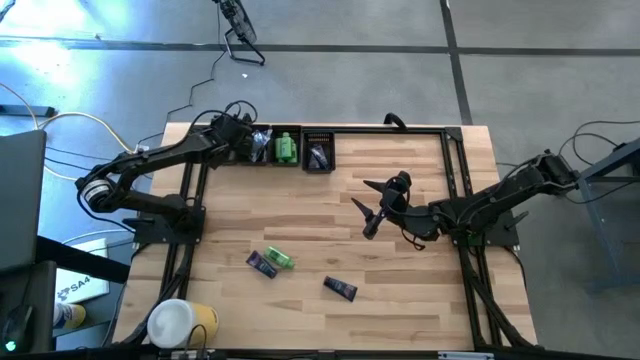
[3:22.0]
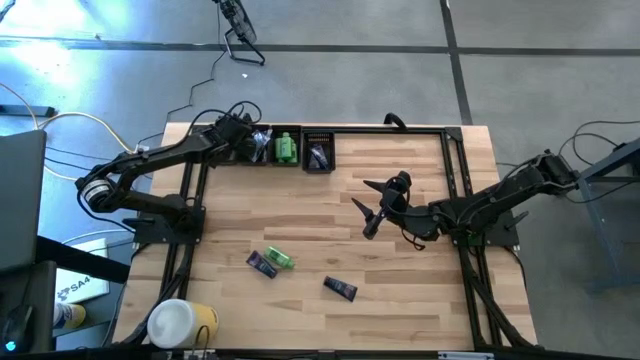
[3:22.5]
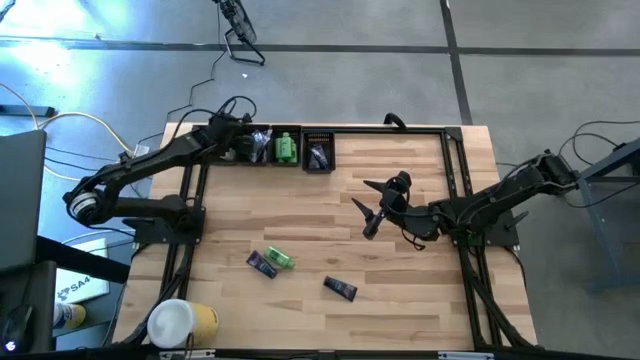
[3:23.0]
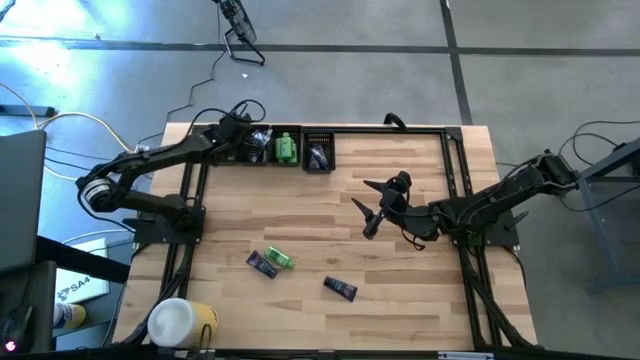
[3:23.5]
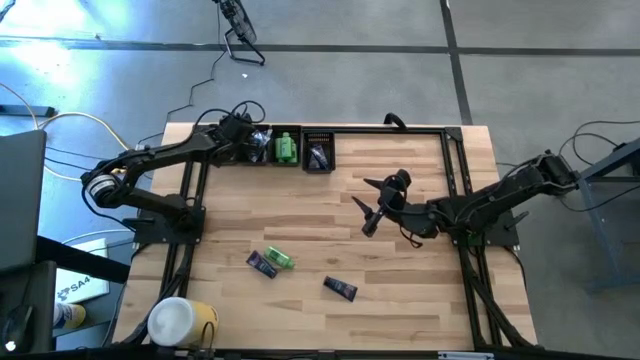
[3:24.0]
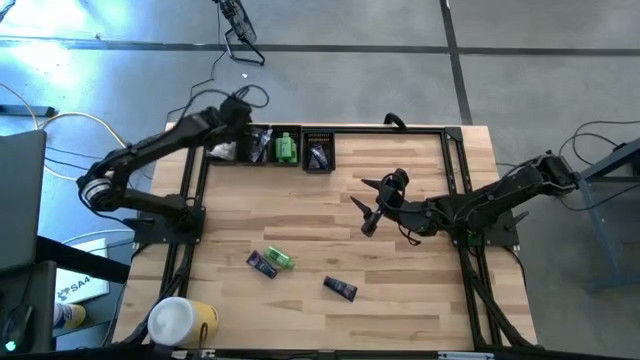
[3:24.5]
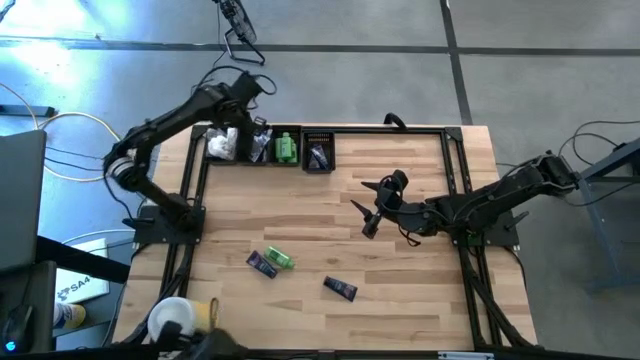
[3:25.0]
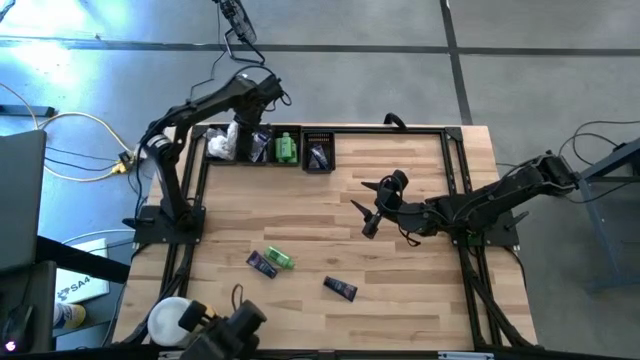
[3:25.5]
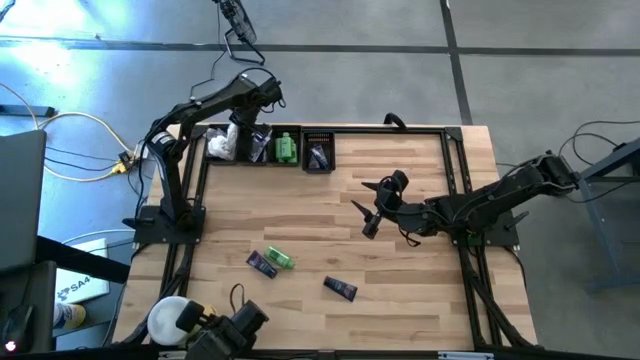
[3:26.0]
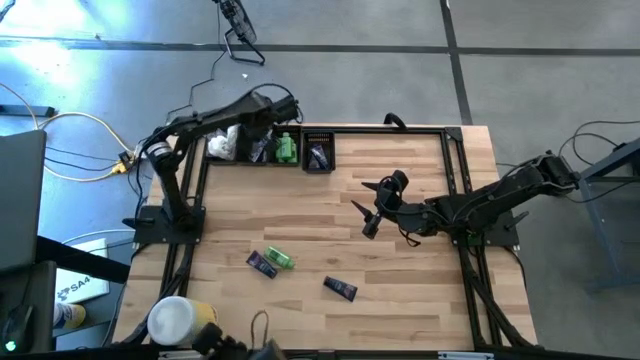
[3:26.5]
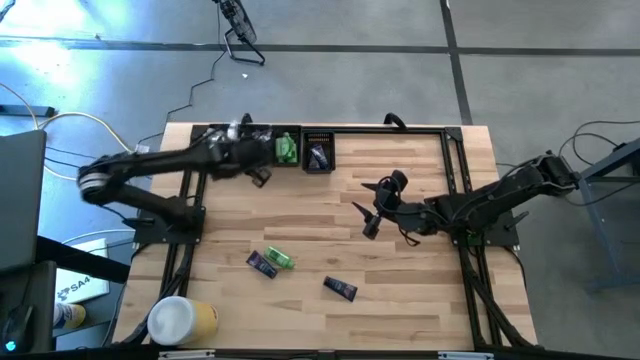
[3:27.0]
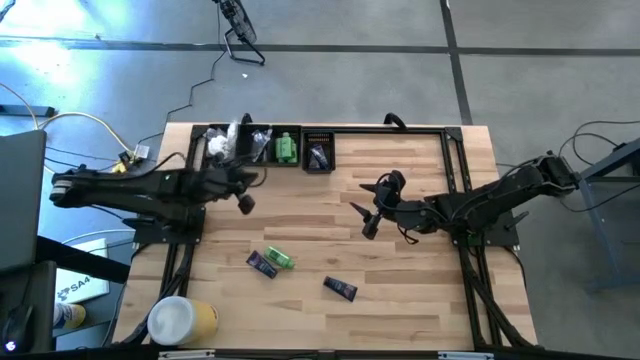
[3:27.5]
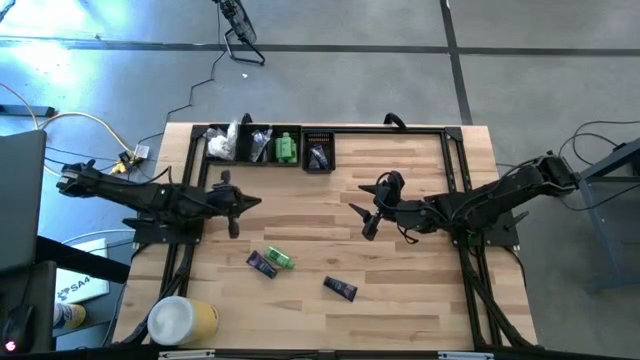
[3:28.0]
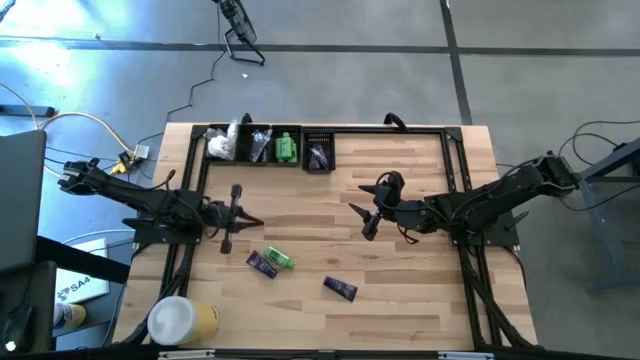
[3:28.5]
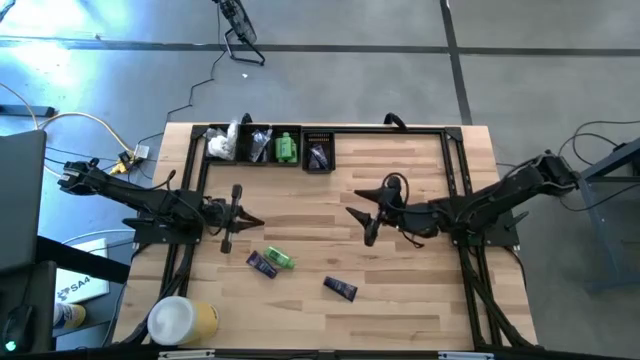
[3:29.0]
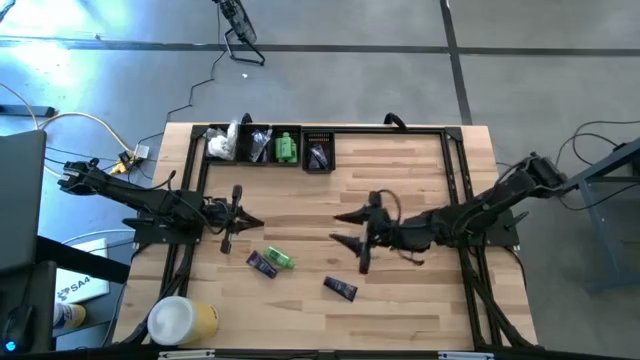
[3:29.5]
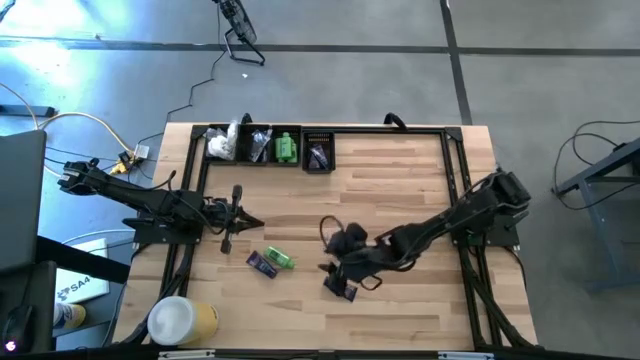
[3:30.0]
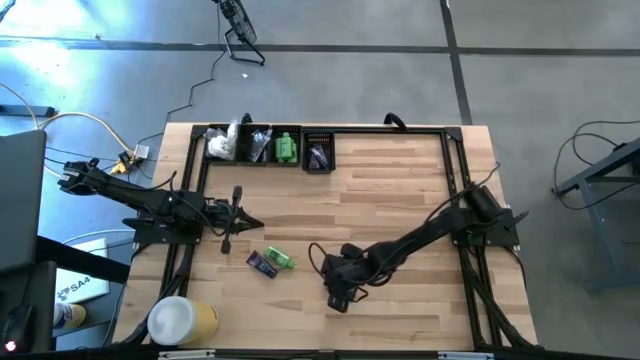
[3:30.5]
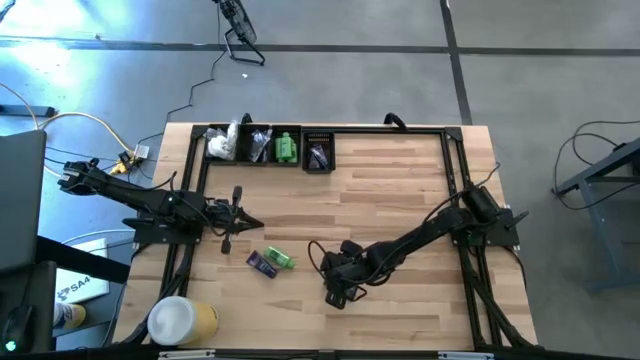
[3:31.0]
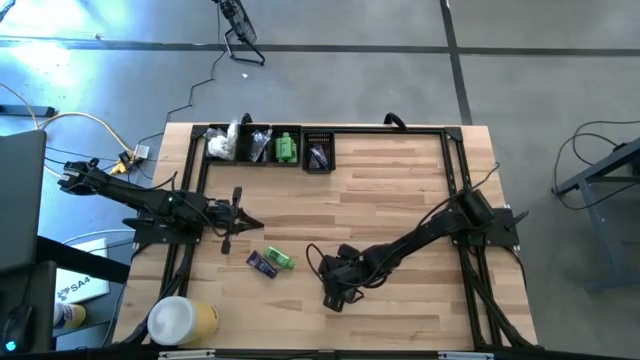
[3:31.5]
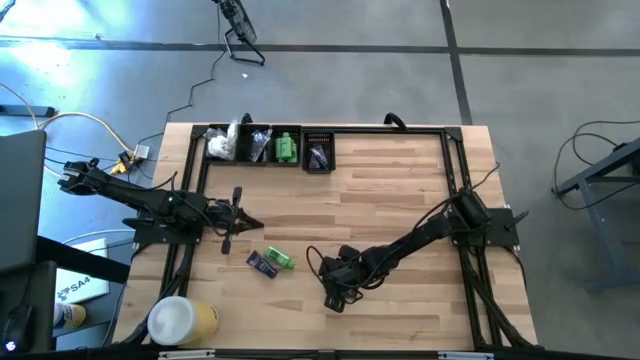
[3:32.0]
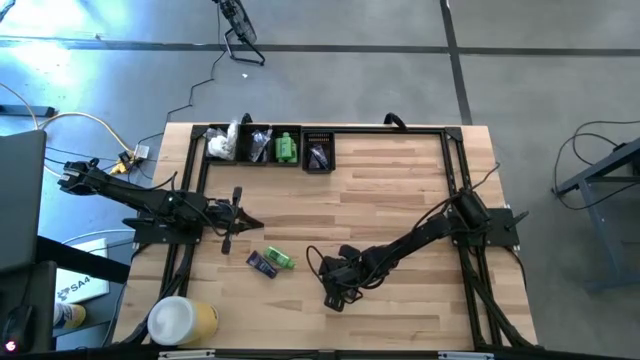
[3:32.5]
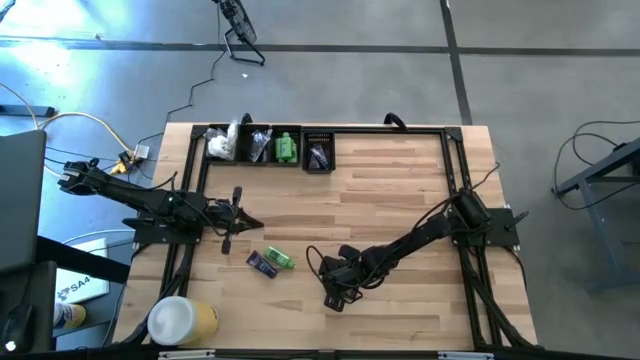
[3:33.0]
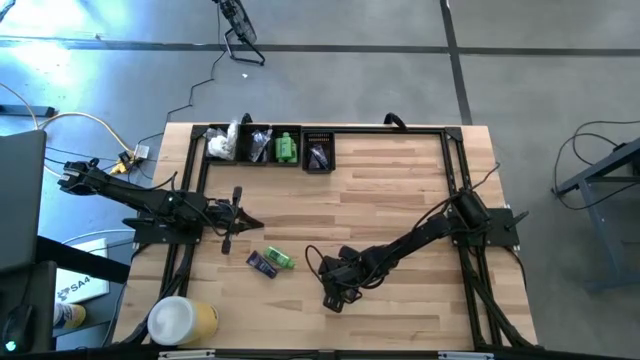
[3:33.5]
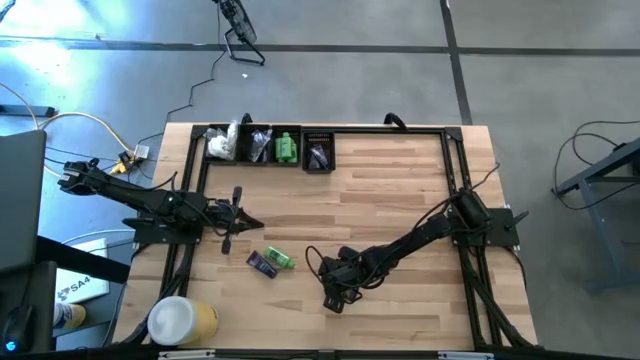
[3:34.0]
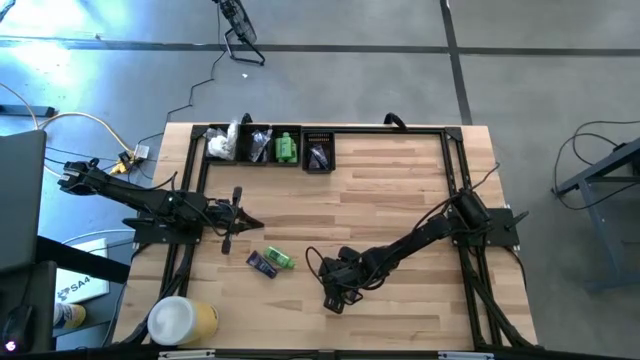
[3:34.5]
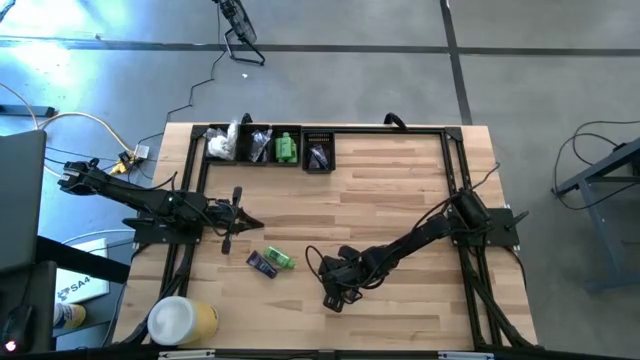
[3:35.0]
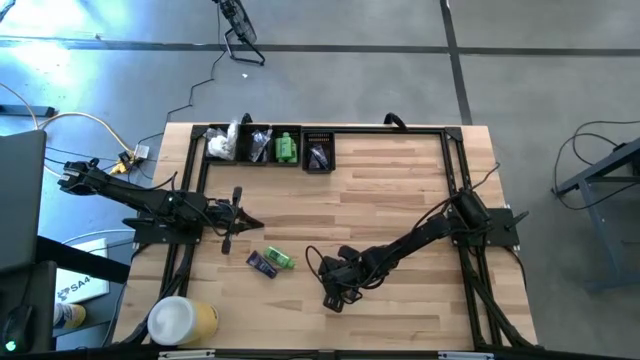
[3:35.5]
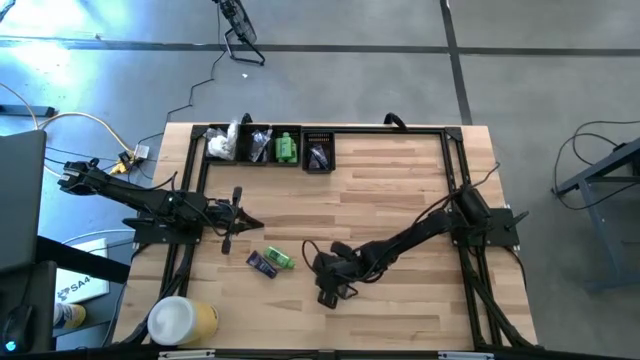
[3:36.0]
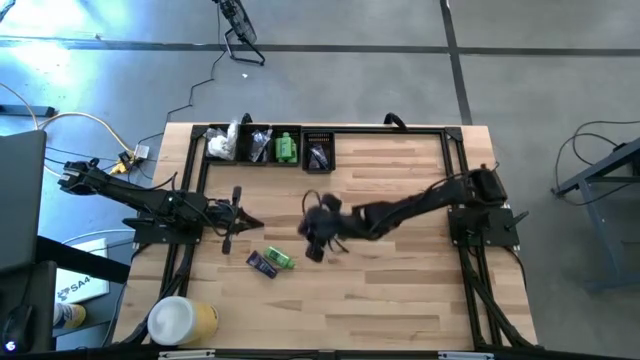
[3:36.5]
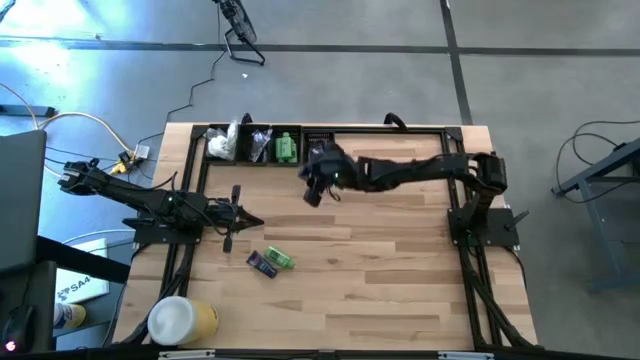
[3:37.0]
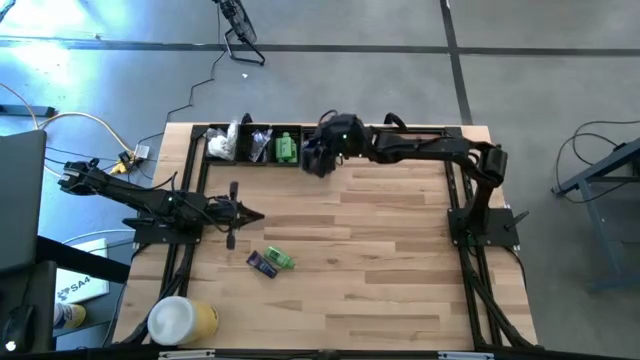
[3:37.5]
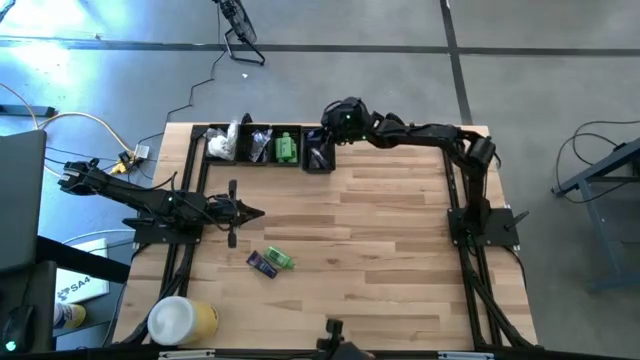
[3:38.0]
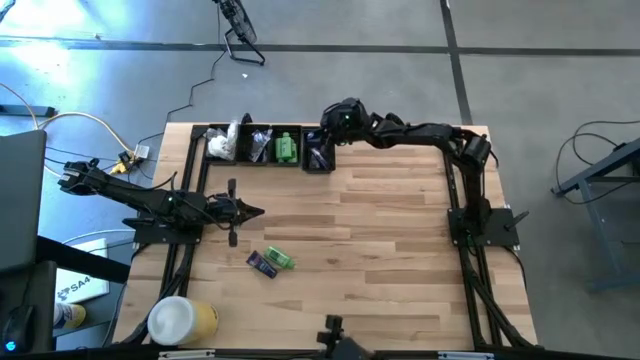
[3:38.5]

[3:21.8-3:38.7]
Task: Pick & Place Travel size toiletries
Put the shave cream into the right black bin

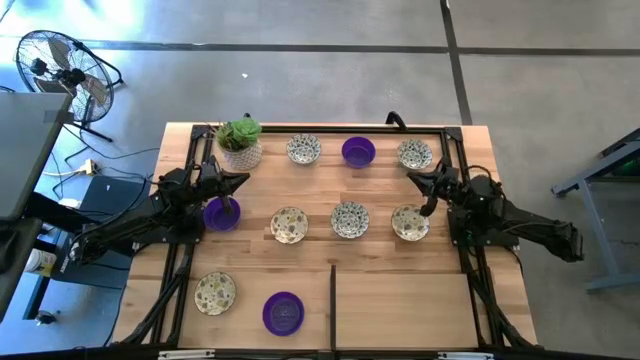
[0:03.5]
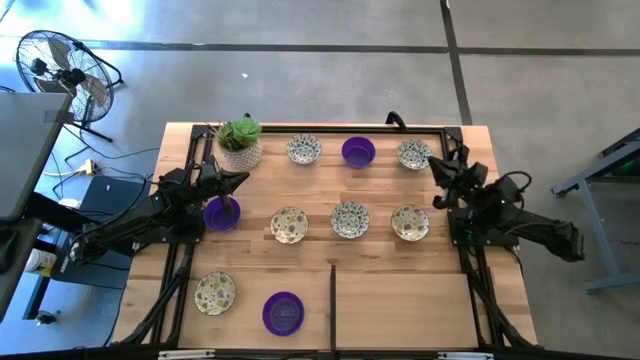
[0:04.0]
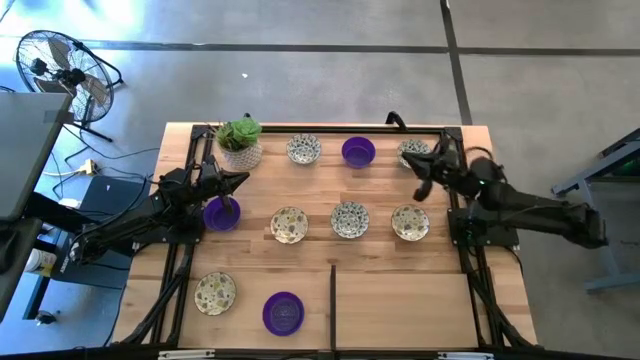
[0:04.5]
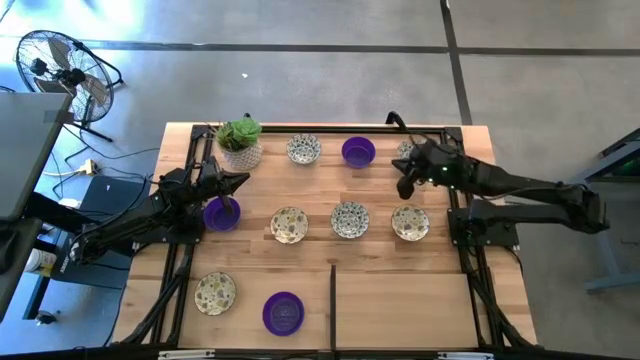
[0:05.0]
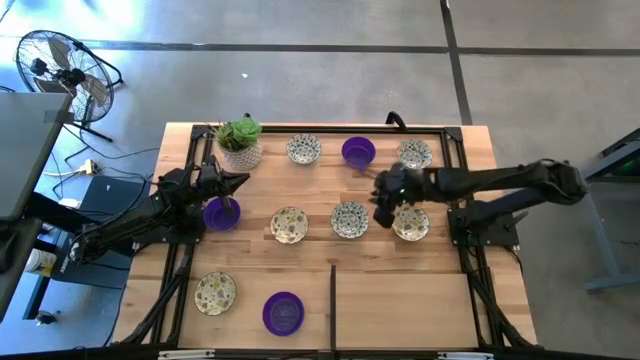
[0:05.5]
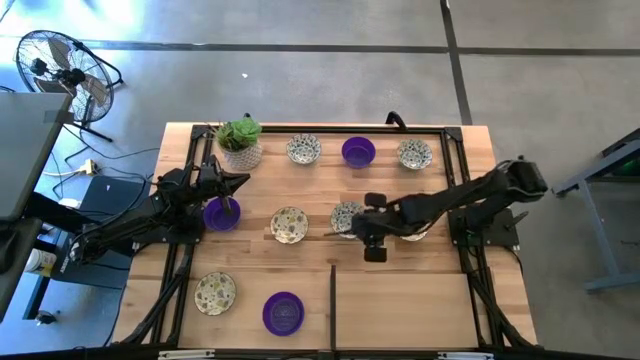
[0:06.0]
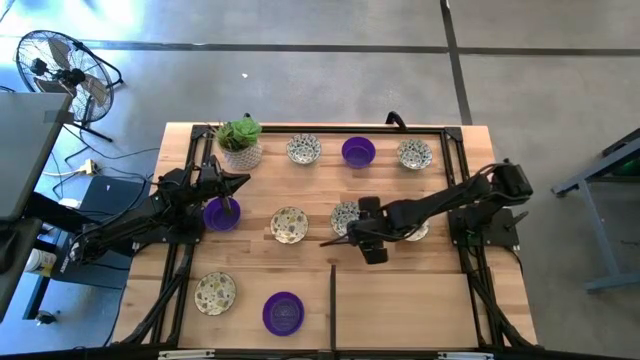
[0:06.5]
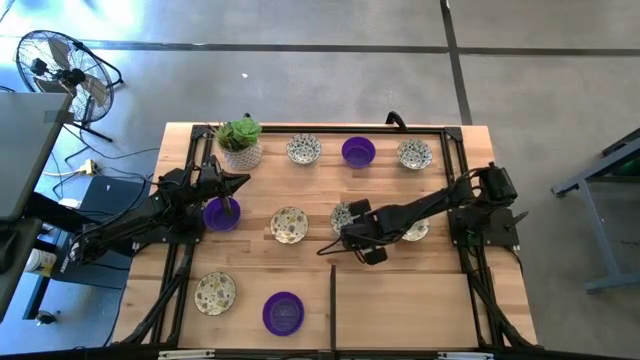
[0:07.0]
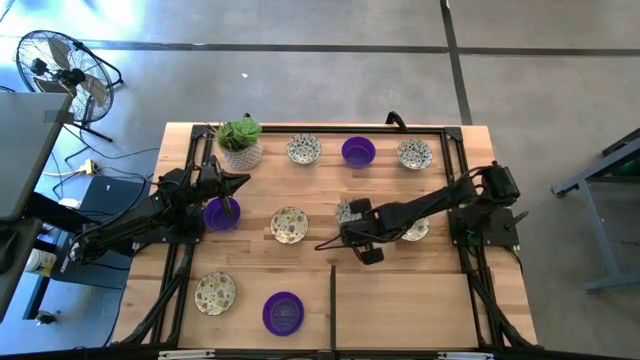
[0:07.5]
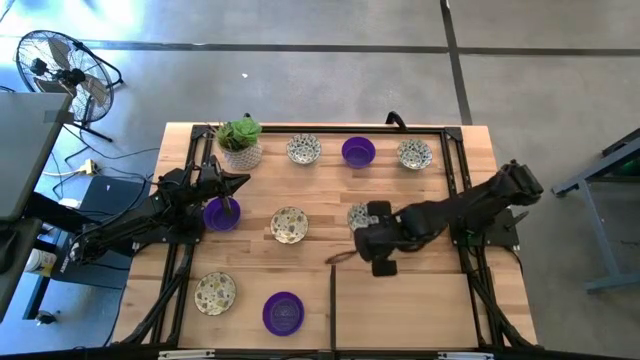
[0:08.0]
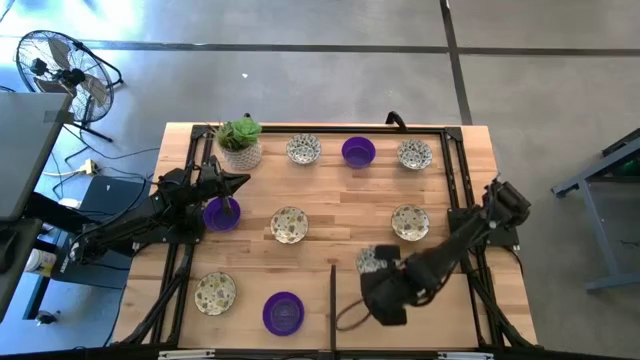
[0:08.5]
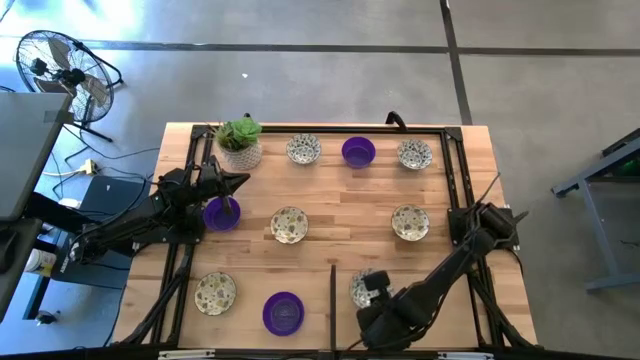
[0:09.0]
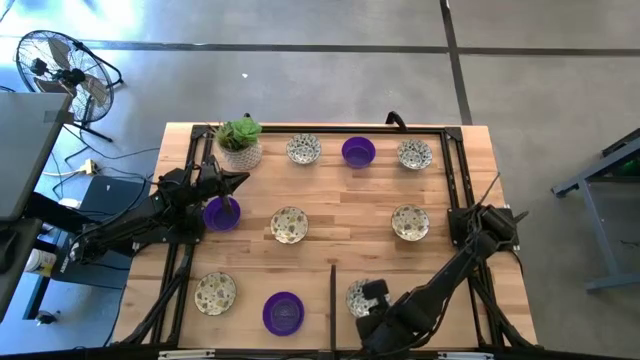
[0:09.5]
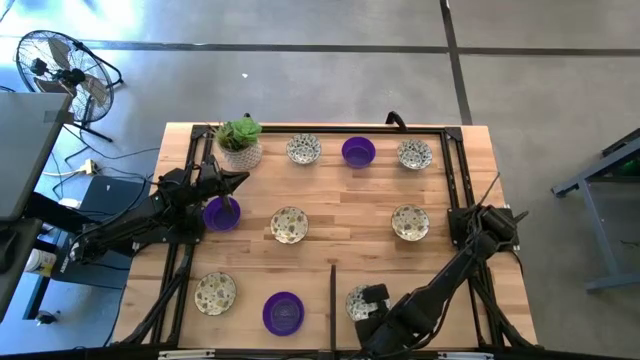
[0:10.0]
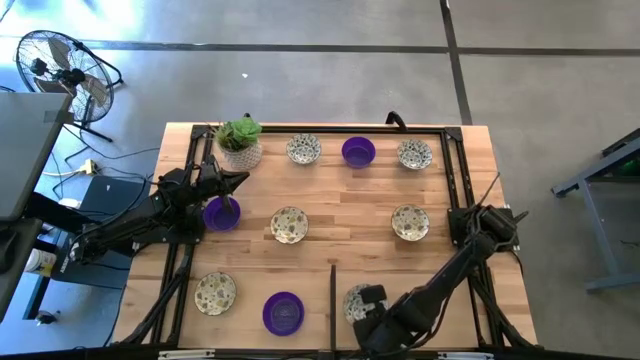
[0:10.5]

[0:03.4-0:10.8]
Task: Pick & Place Mini bowls
Put the bottom blue patterned bowl on the shelf
